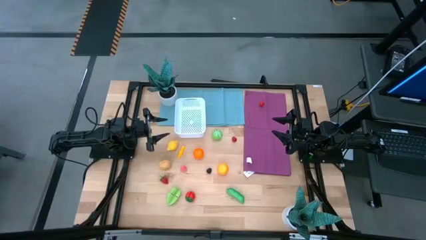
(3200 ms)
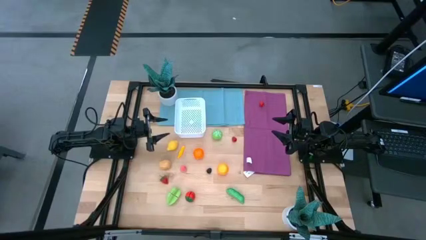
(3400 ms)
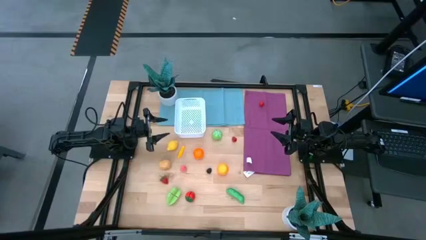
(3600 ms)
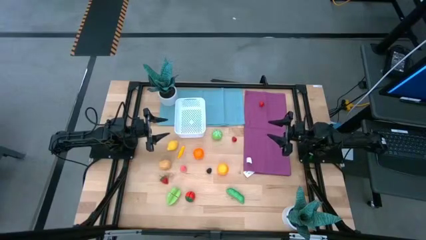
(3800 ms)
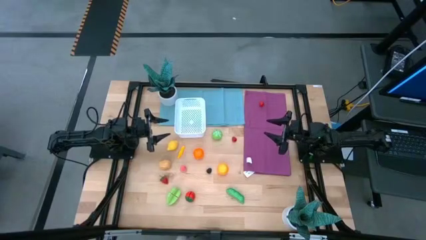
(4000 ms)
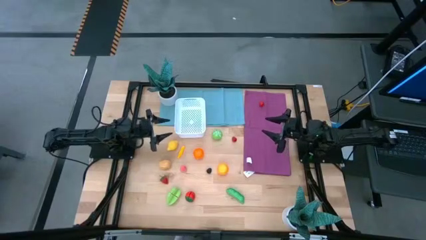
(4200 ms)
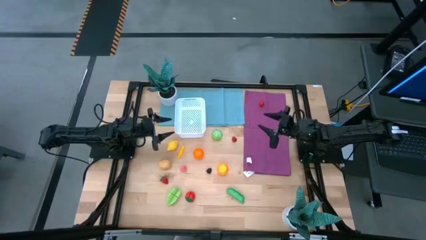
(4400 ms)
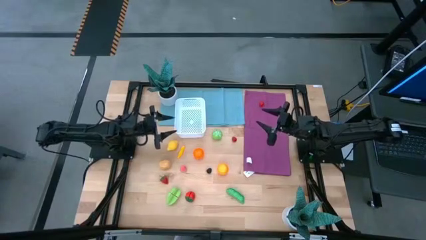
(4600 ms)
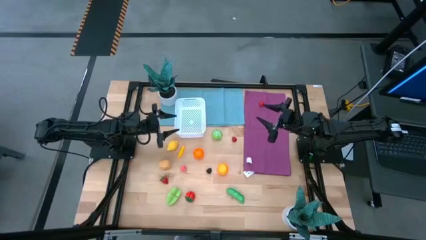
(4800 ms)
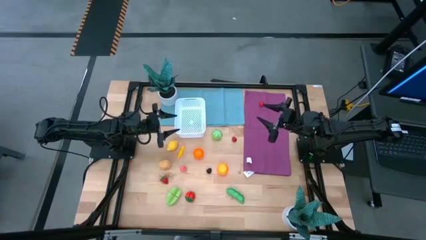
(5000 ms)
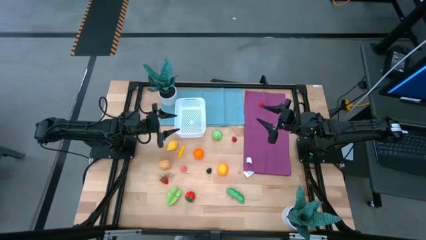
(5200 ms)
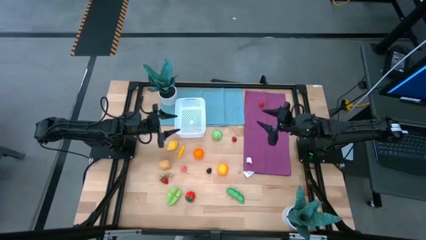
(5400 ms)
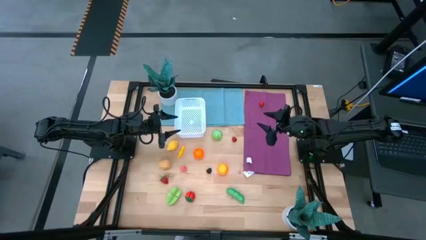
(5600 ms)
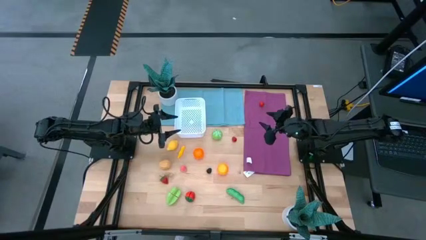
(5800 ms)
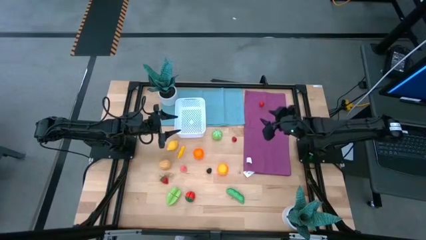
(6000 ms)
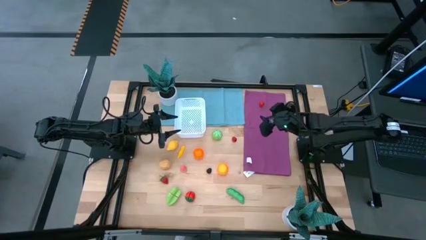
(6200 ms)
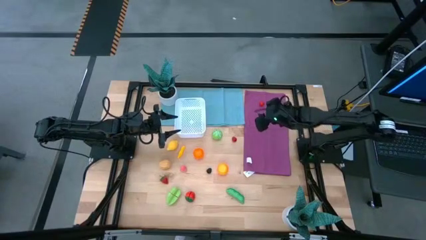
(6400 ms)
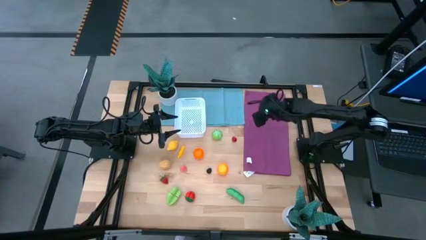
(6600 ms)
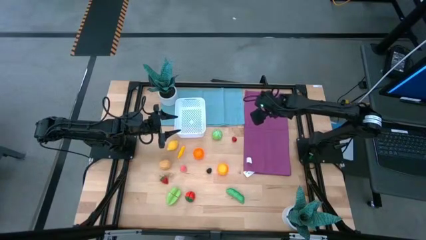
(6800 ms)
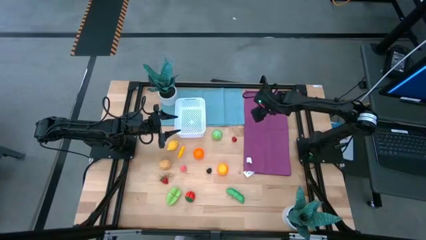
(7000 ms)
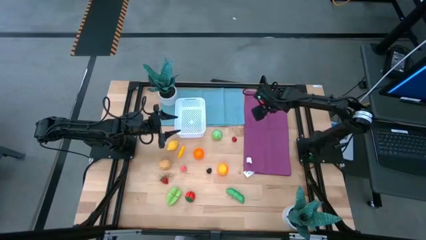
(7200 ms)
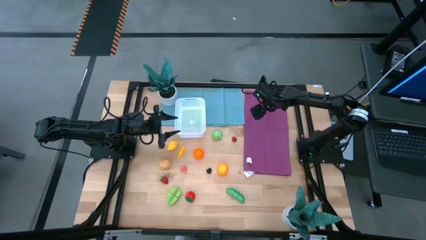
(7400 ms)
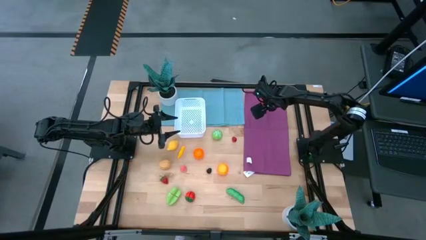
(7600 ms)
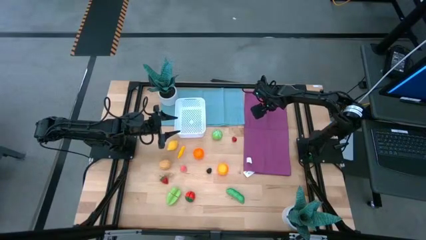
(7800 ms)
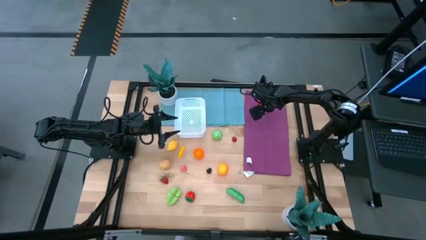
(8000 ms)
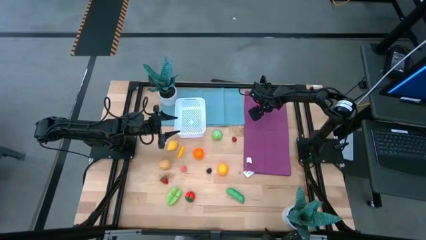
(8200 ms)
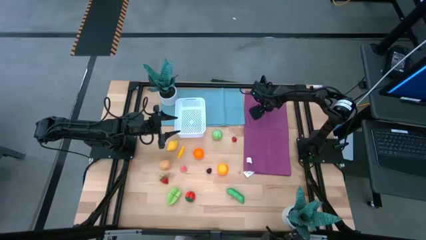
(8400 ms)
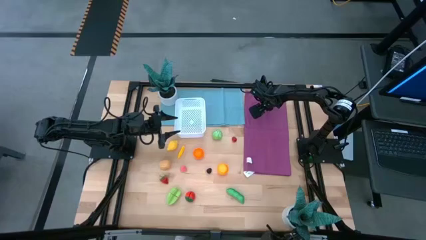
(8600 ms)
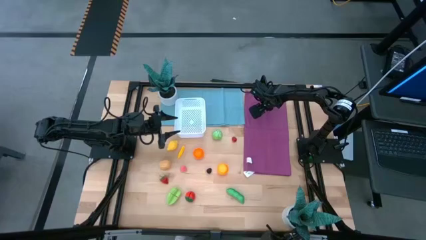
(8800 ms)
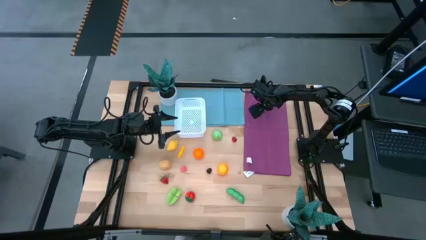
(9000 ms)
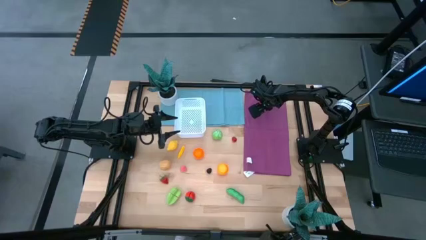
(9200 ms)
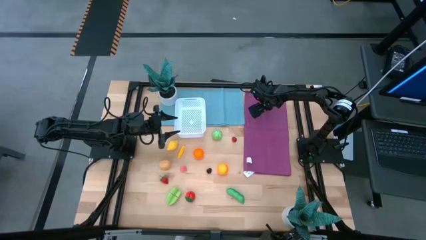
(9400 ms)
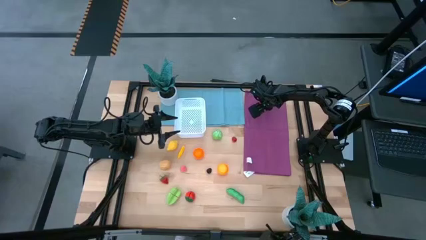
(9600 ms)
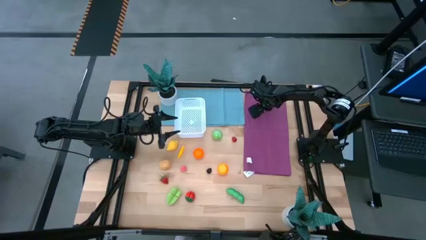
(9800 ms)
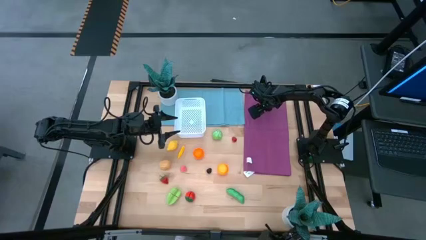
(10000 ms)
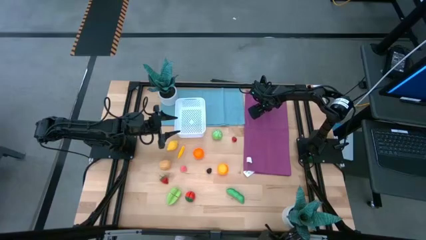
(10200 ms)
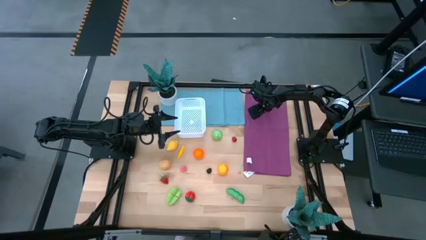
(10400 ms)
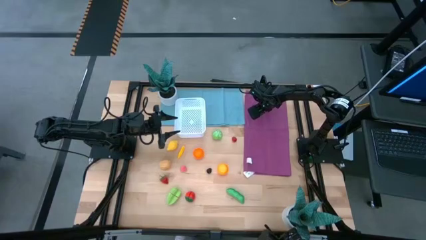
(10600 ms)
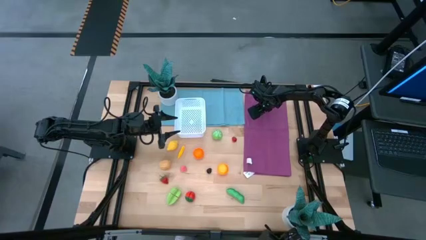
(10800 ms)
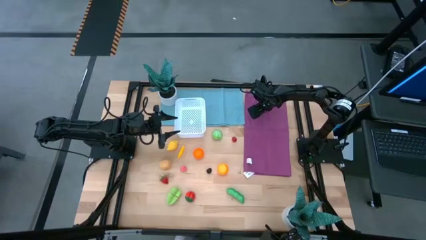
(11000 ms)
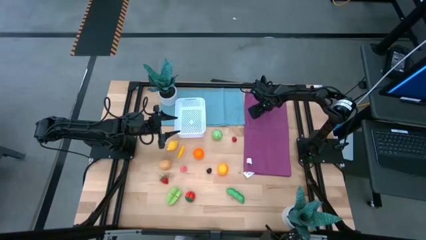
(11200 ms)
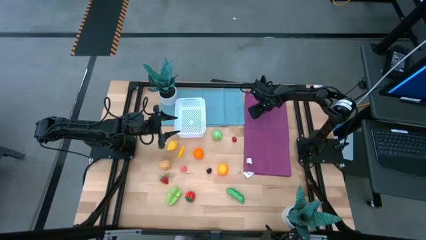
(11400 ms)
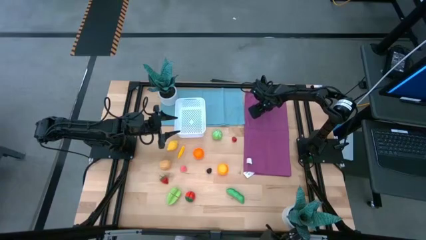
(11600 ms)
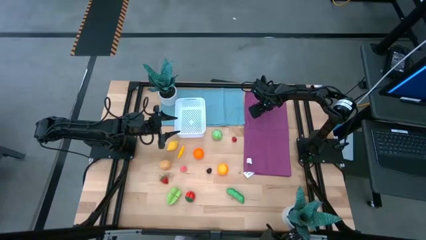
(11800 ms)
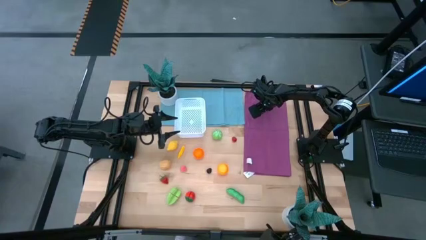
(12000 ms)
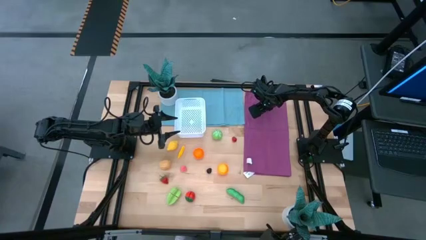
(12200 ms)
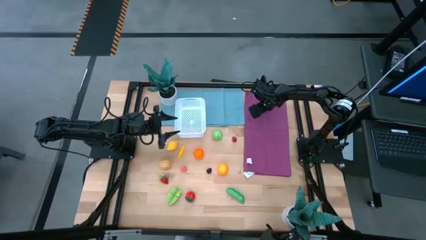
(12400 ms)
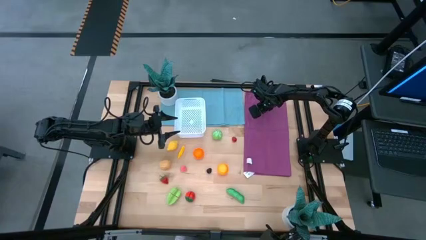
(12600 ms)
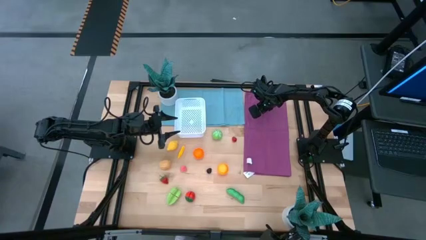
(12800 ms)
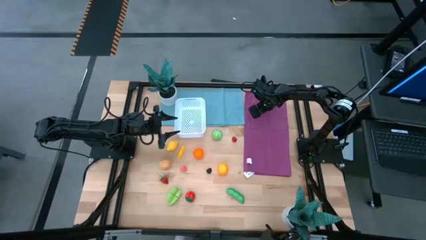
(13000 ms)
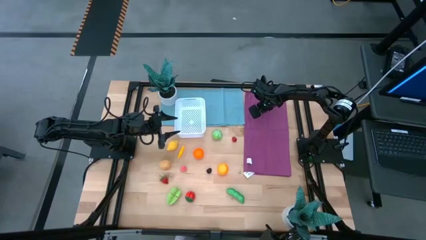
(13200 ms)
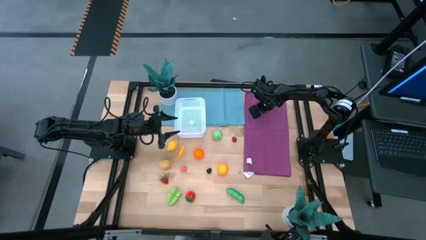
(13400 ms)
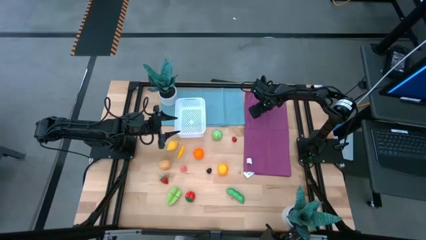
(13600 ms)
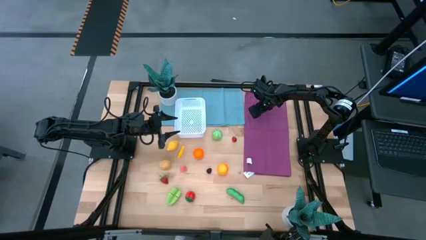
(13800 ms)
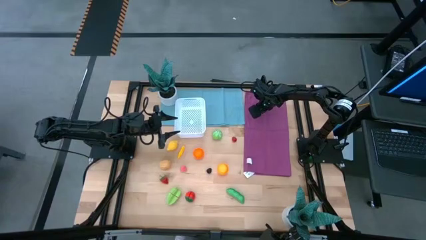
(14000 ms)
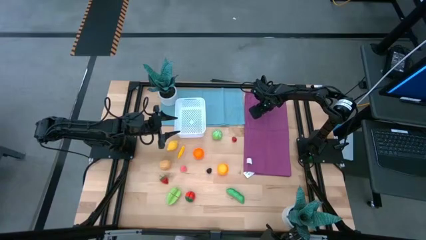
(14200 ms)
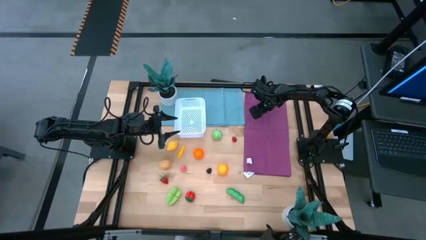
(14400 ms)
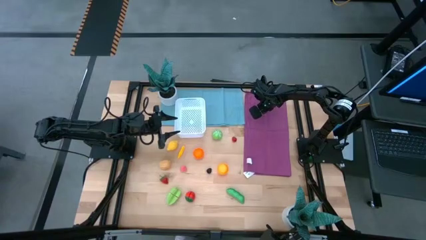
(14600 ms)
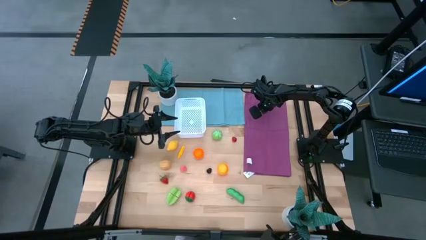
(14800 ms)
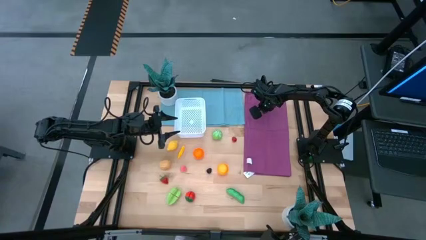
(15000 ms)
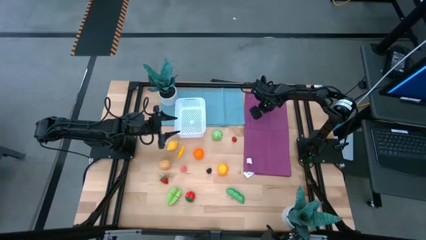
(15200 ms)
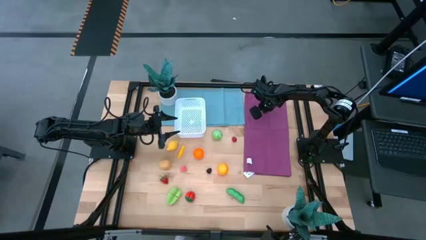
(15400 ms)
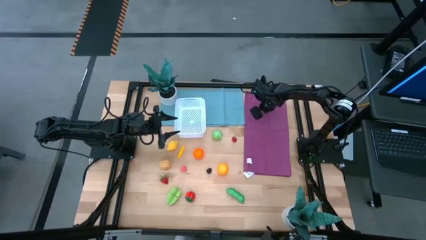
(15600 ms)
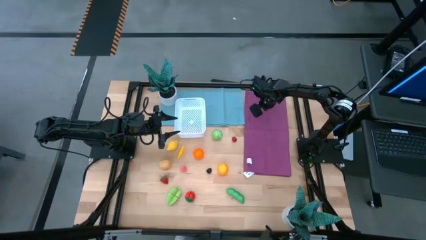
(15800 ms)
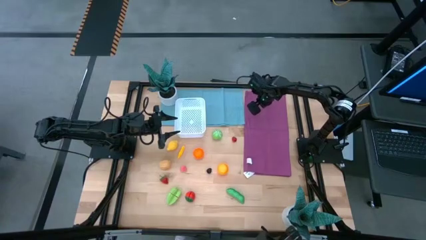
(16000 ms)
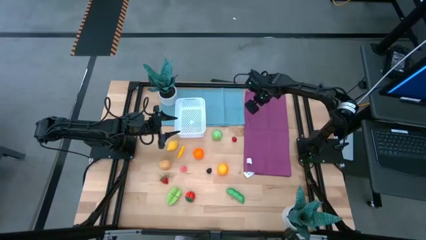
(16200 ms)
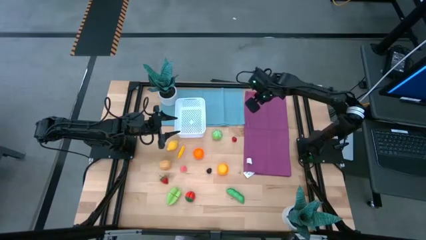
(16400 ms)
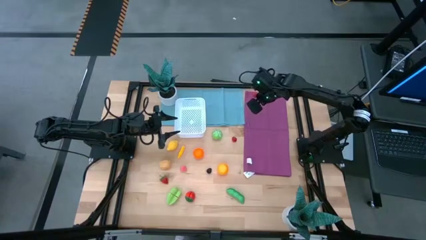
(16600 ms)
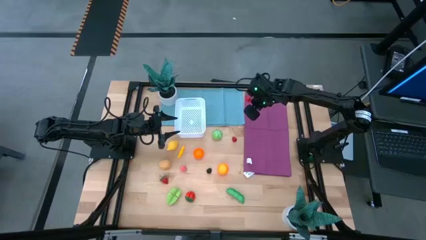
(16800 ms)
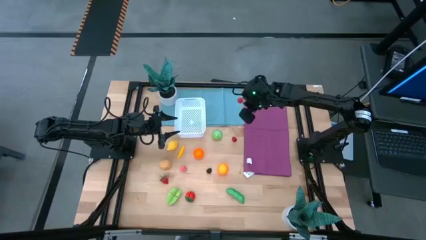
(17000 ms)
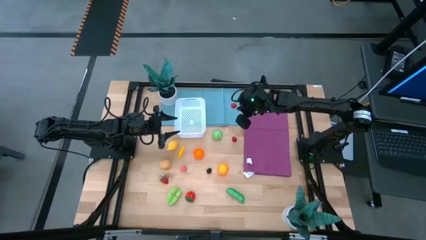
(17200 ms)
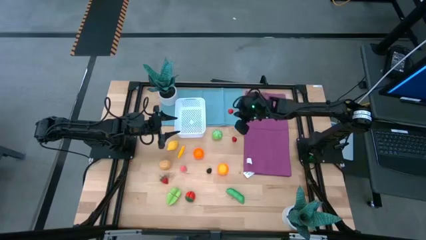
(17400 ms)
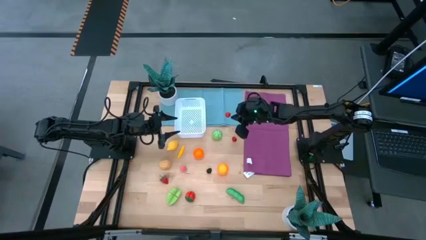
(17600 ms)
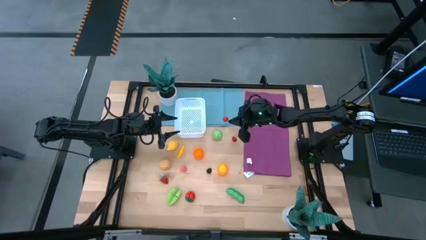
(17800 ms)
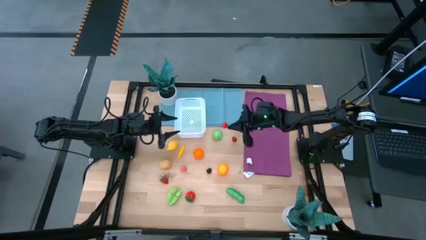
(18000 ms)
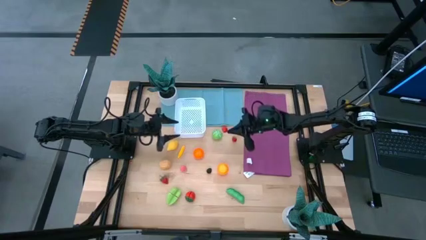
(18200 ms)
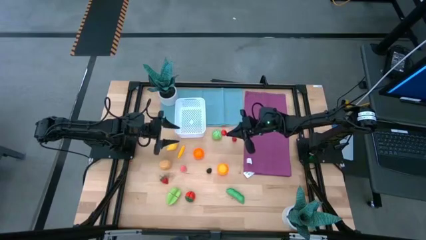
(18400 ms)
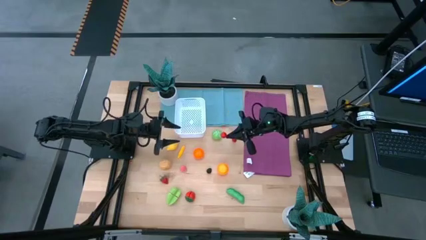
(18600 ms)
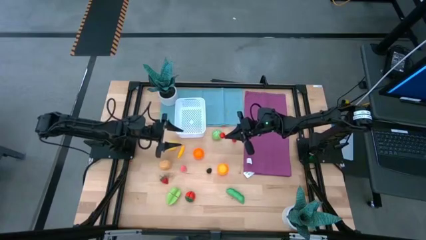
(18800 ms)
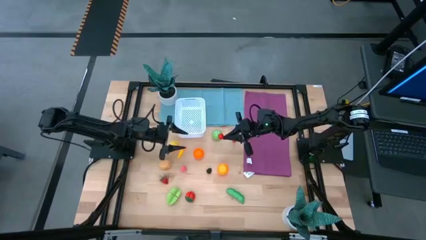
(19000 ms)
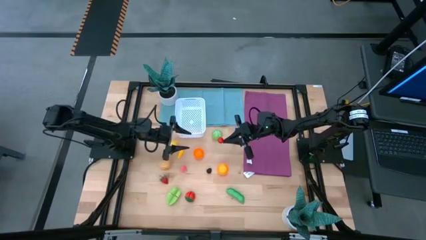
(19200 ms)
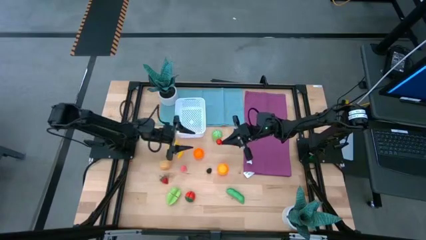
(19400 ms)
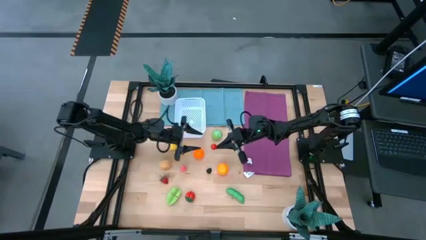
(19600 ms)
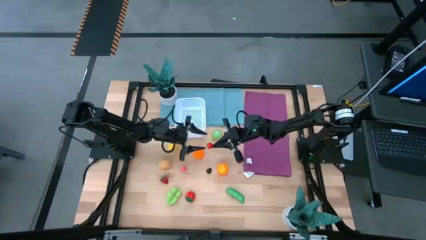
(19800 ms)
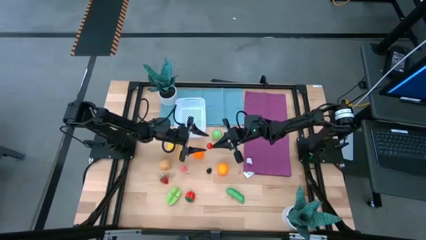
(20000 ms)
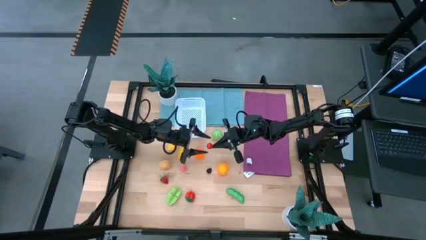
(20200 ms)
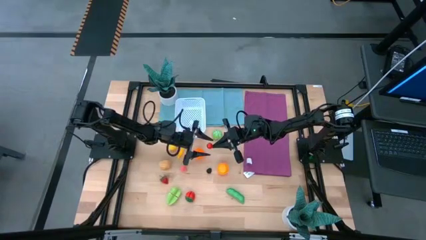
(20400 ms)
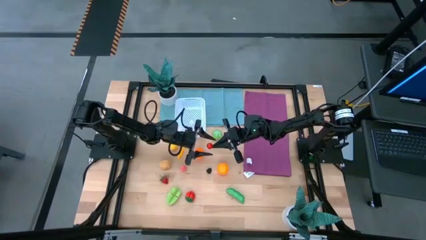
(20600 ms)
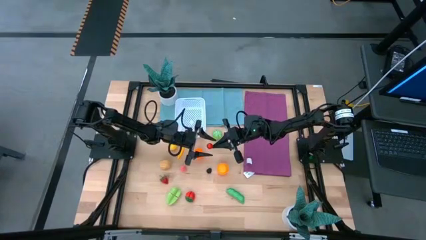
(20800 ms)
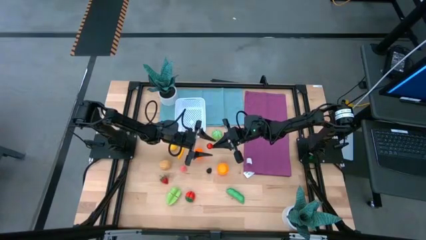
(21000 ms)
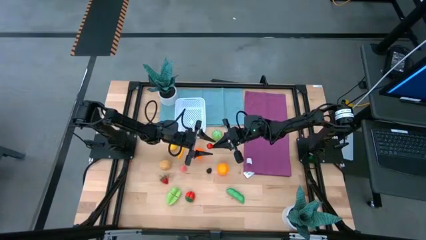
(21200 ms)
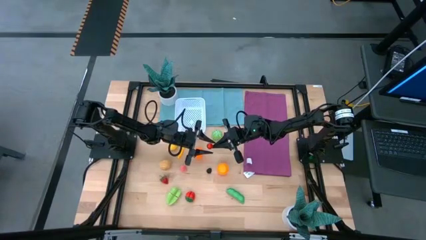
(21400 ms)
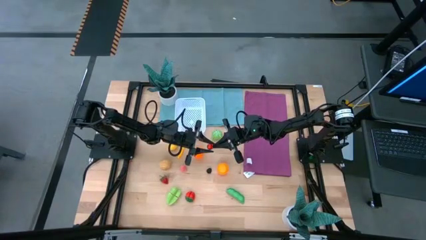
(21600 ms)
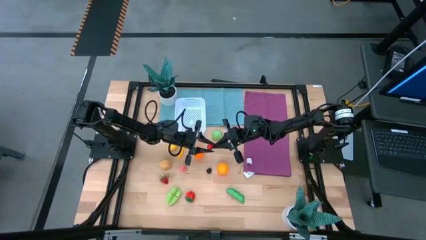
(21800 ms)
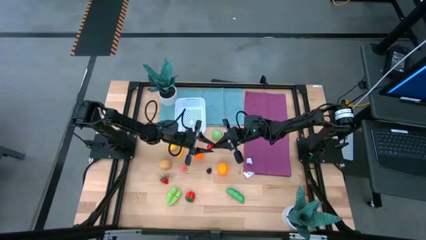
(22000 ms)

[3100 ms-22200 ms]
Task: Pick and placing Produce into tupperware
Put the red cherry into the white basket
